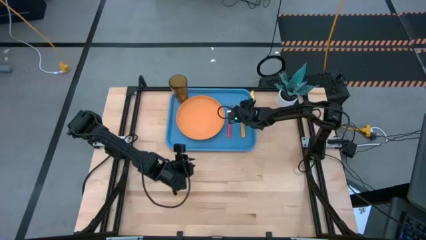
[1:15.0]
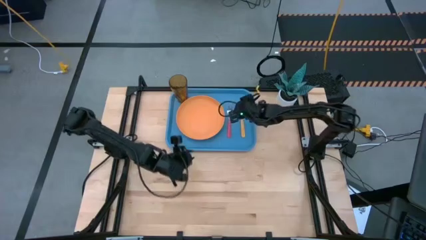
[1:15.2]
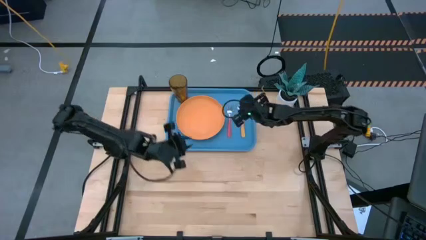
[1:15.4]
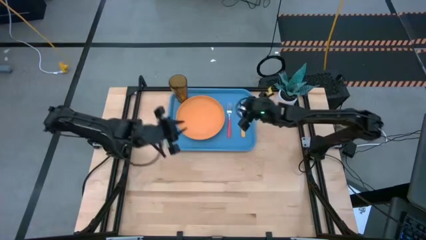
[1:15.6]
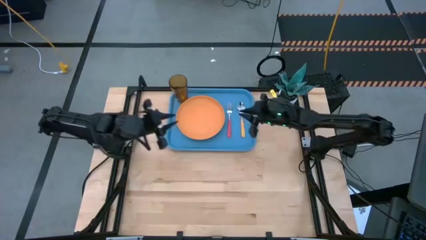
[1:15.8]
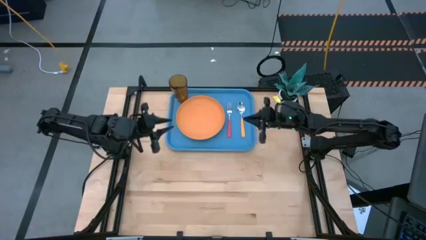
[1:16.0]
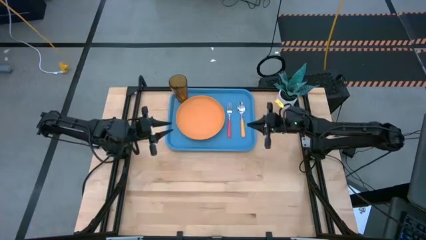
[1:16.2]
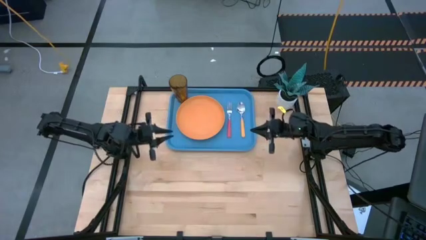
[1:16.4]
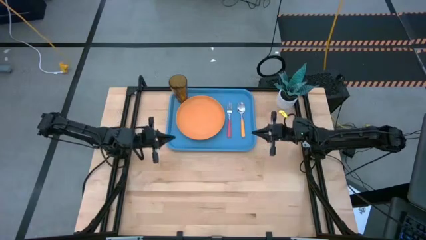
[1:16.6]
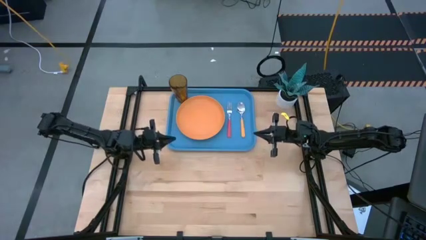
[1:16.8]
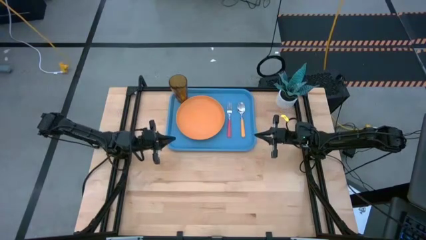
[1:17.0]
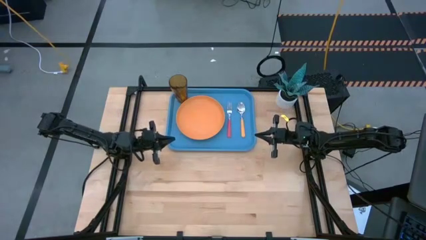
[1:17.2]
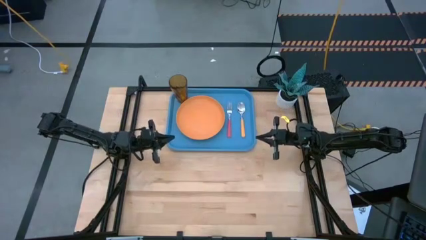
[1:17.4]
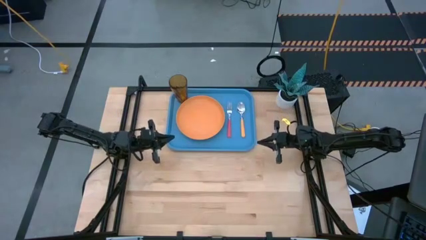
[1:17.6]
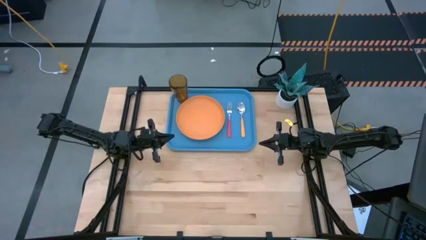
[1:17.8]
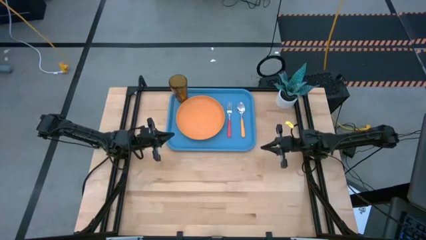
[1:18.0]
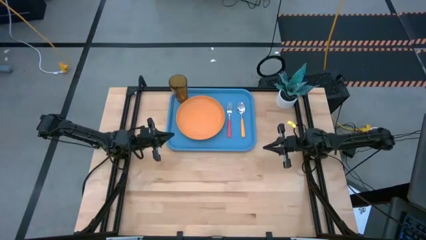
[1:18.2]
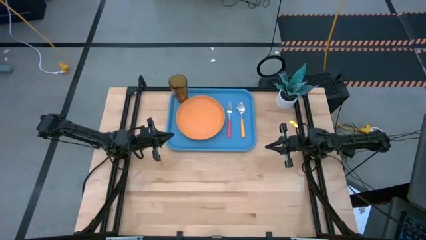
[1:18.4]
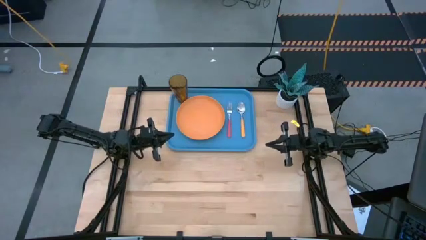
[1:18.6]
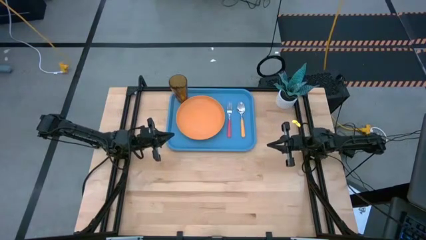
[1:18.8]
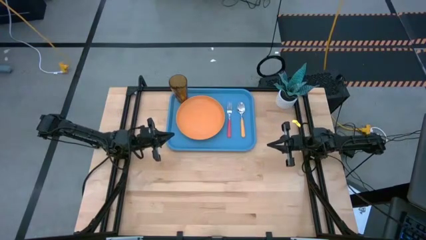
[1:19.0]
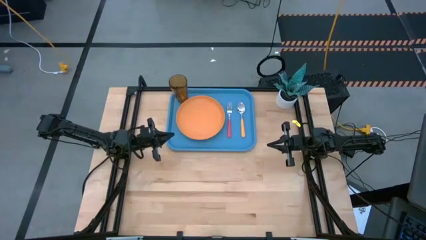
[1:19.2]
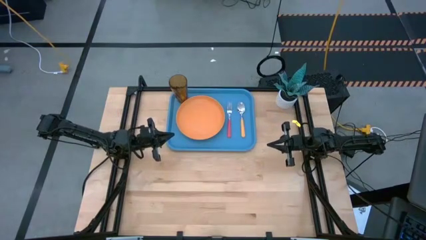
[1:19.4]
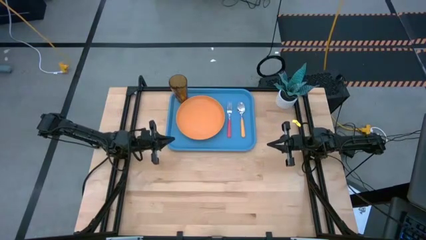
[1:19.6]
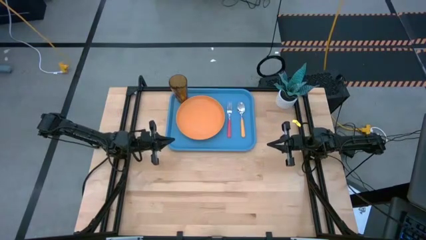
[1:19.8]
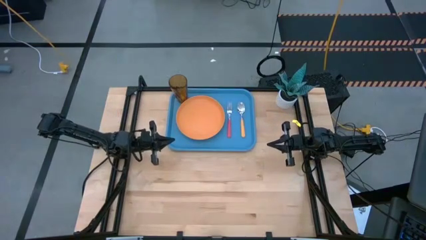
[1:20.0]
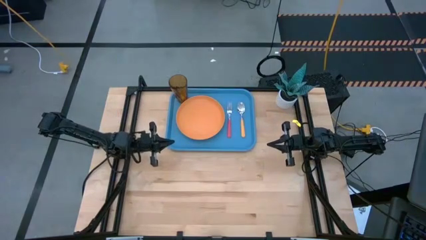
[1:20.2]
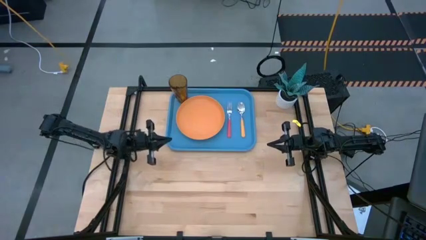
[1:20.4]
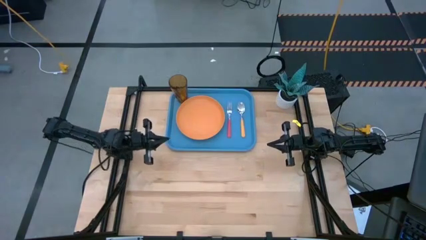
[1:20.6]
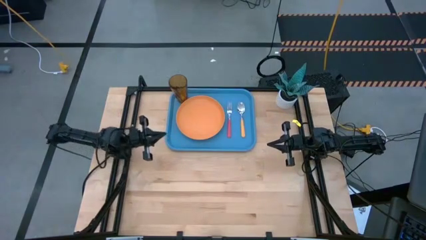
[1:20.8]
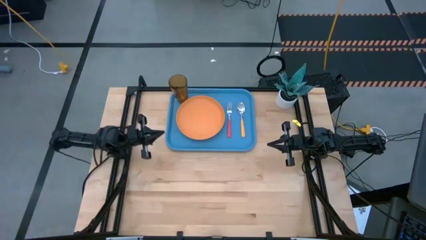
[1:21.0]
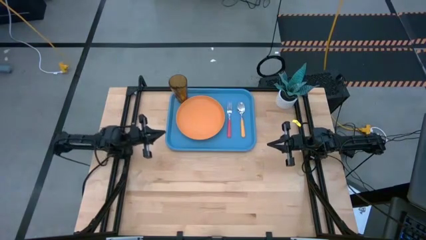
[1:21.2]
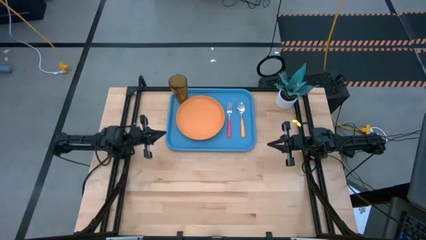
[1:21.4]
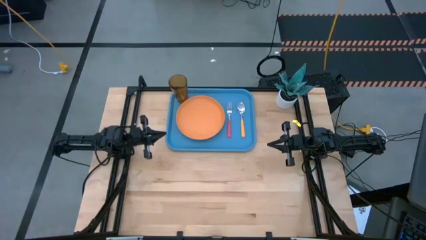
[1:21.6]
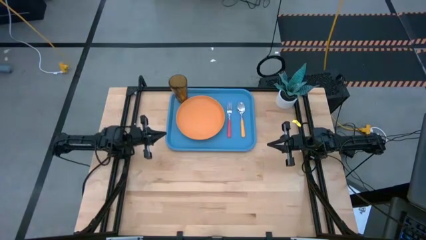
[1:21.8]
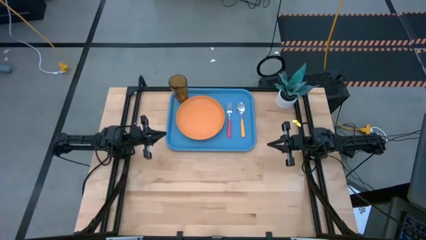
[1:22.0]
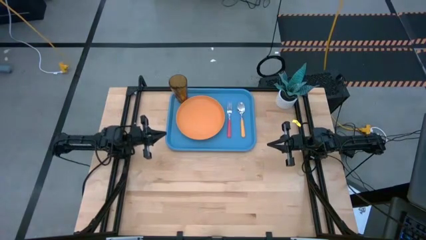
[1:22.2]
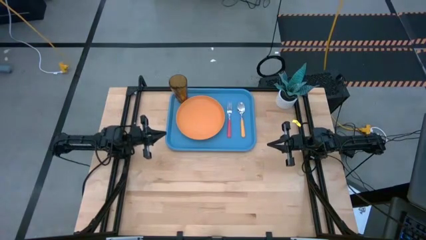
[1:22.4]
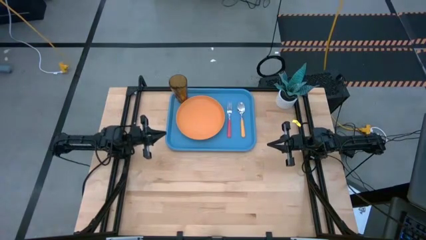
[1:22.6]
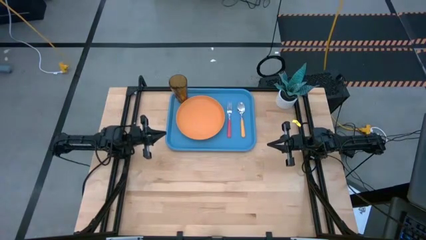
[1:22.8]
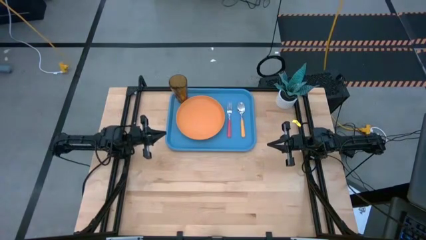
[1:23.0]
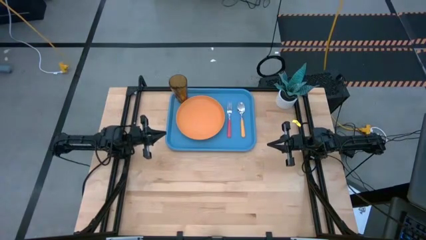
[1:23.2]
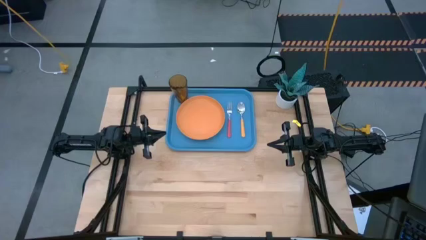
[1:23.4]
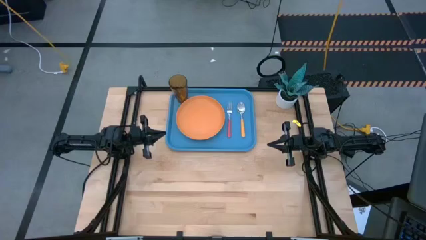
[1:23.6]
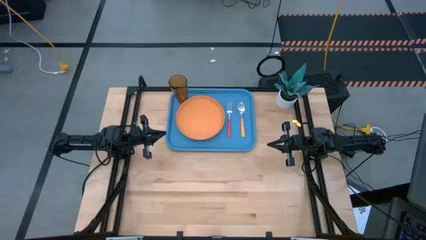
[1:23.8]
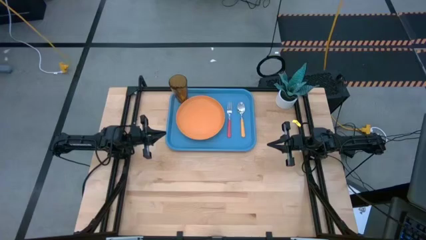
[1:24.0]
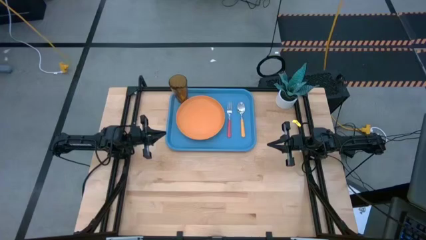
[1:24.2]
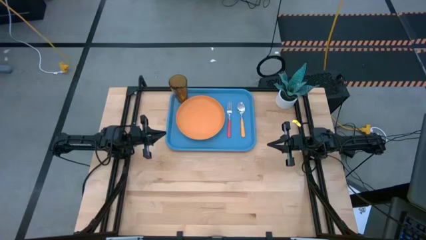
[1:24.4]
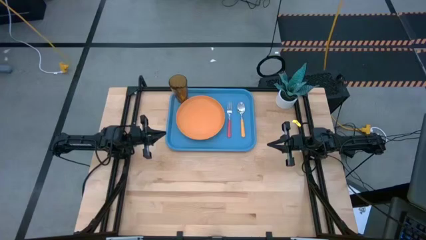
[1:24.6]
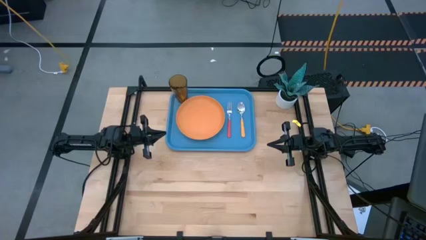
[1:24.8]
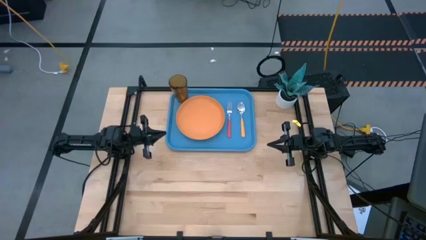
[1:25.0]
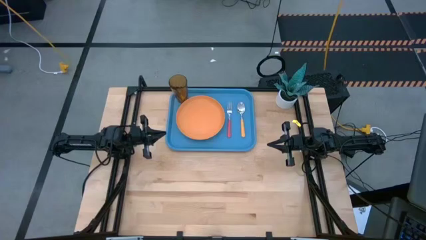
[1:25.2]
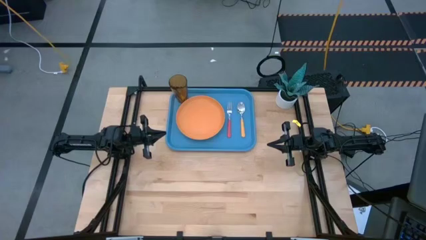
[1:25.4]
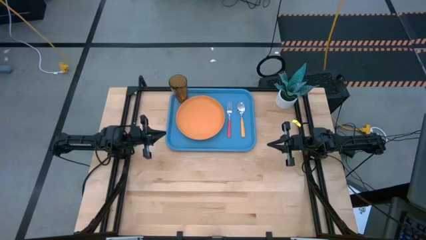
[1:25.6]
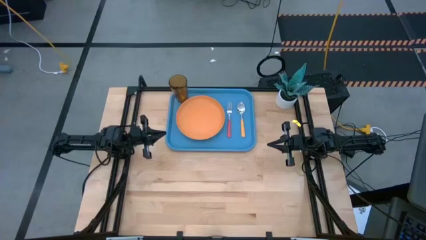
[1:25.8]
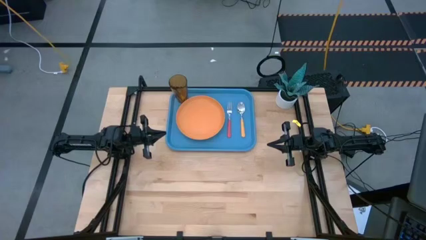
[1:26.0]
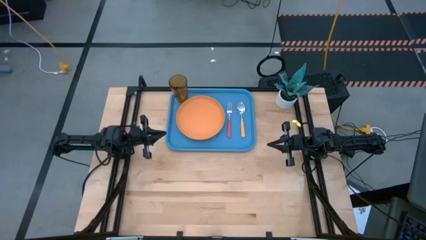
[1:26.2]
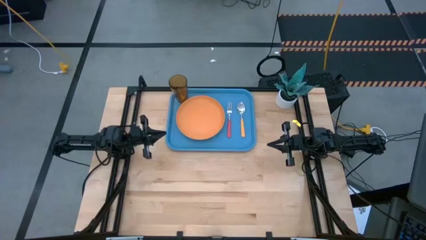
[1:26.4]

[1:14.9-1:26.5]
Task: Pick and place plate/cup/fork/spoon on tray
Return to Home Position
